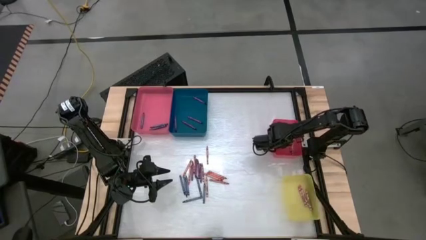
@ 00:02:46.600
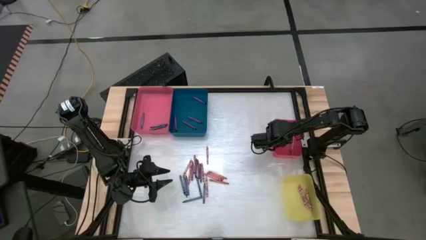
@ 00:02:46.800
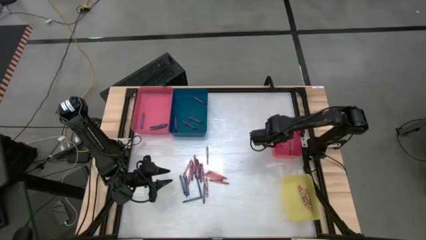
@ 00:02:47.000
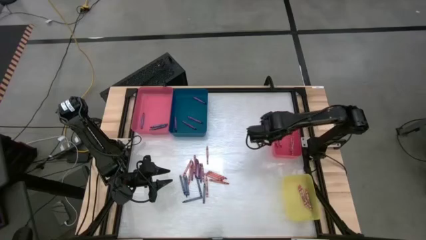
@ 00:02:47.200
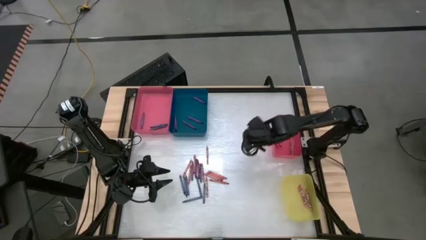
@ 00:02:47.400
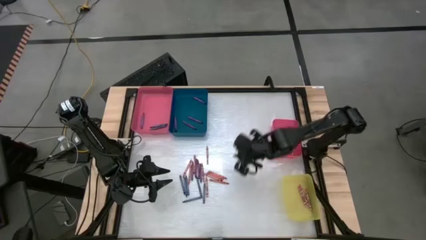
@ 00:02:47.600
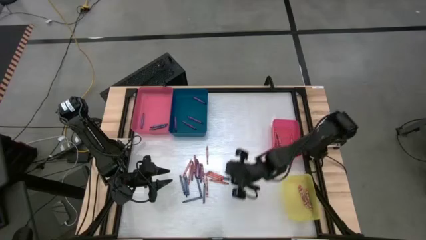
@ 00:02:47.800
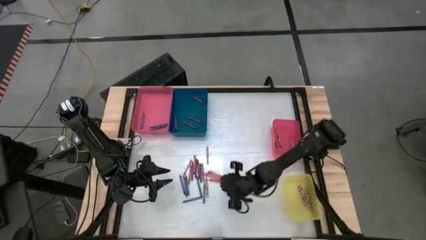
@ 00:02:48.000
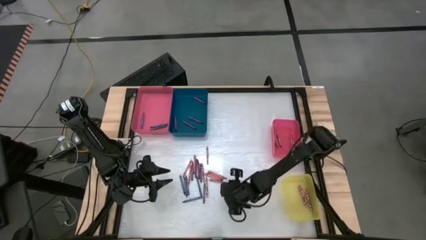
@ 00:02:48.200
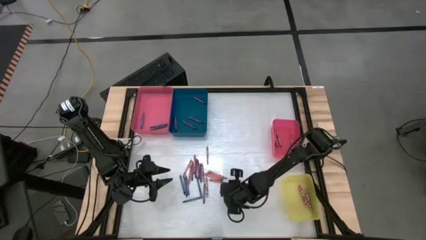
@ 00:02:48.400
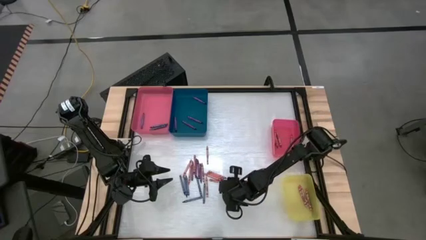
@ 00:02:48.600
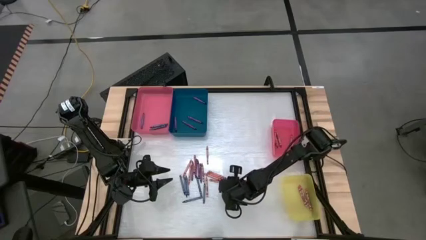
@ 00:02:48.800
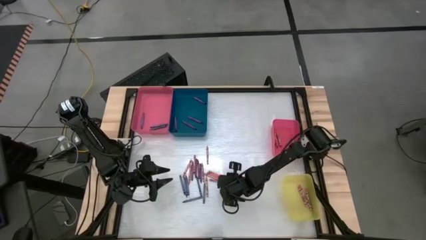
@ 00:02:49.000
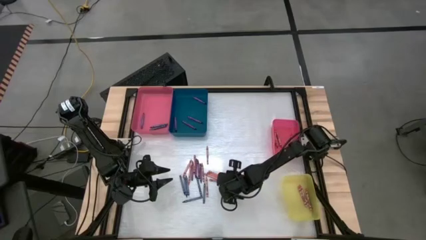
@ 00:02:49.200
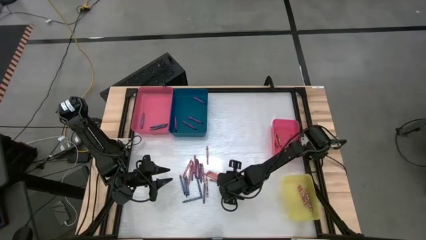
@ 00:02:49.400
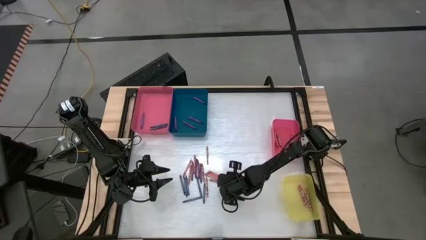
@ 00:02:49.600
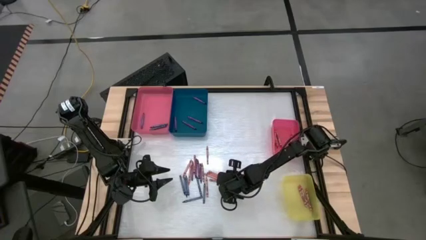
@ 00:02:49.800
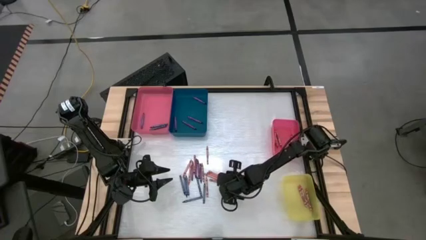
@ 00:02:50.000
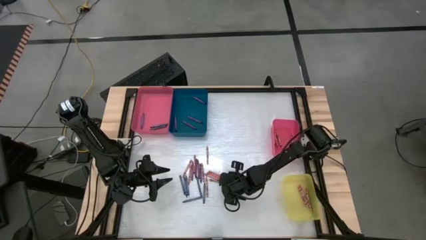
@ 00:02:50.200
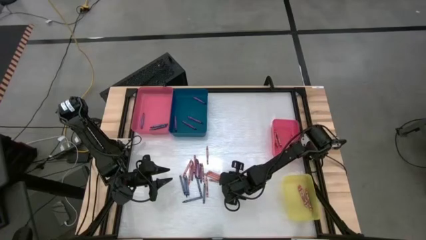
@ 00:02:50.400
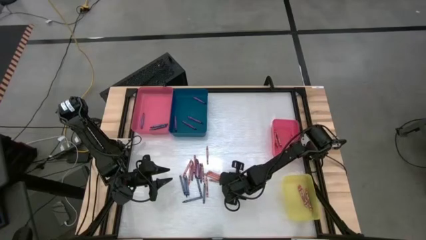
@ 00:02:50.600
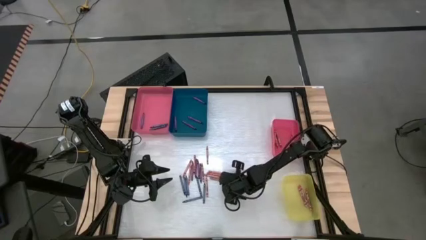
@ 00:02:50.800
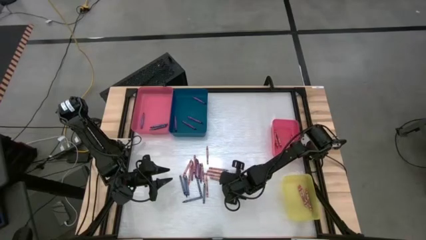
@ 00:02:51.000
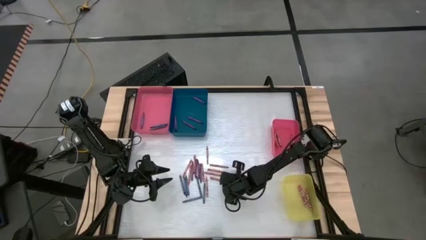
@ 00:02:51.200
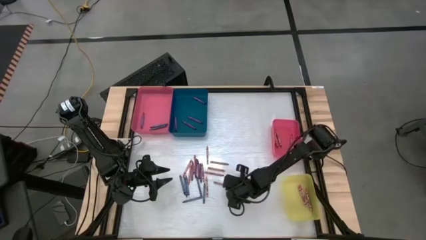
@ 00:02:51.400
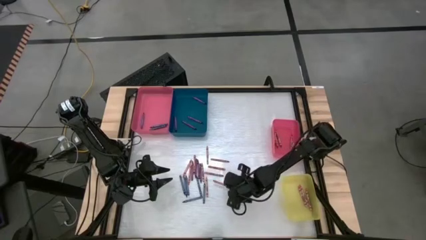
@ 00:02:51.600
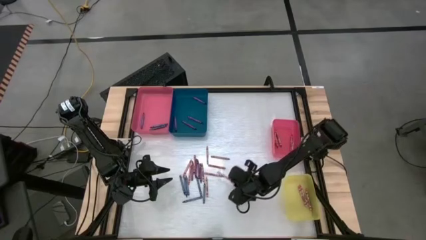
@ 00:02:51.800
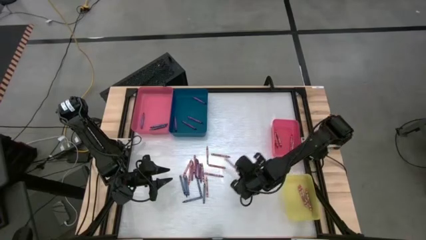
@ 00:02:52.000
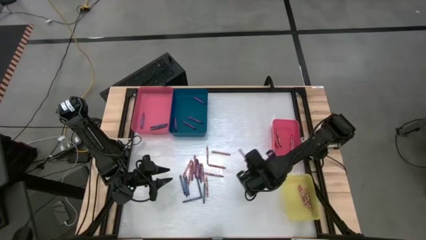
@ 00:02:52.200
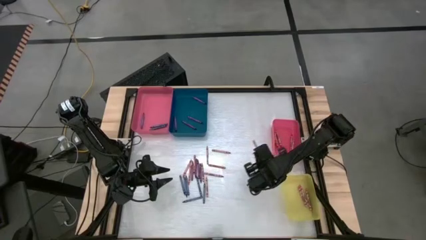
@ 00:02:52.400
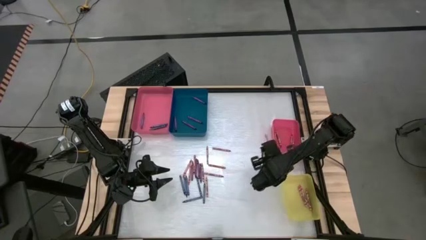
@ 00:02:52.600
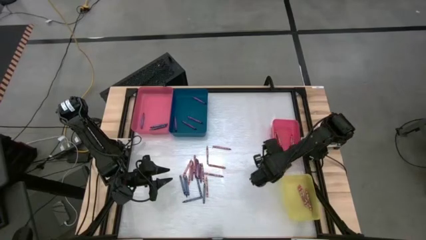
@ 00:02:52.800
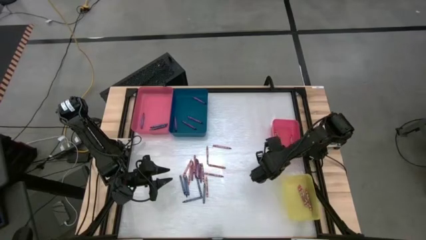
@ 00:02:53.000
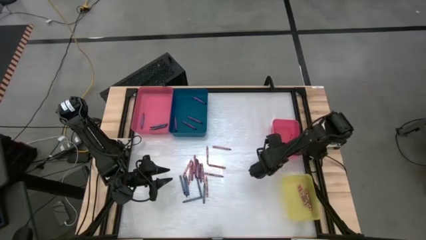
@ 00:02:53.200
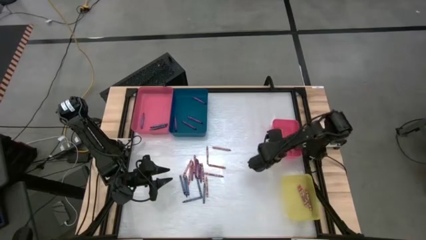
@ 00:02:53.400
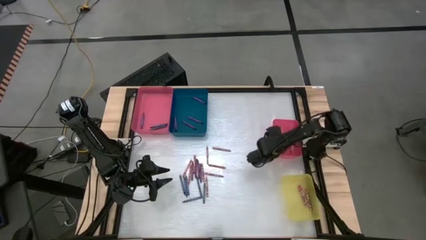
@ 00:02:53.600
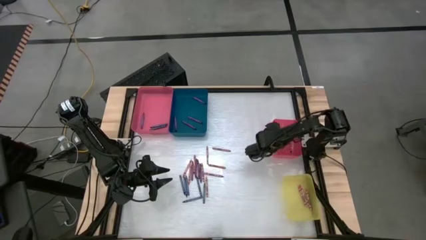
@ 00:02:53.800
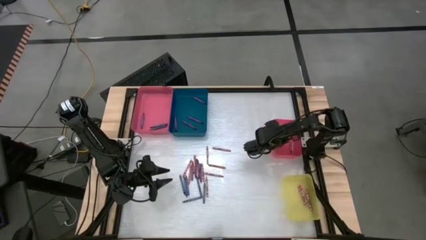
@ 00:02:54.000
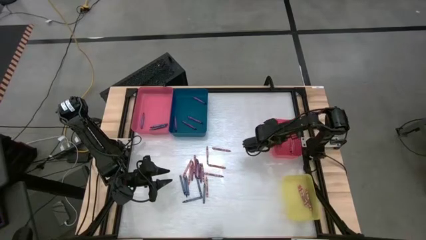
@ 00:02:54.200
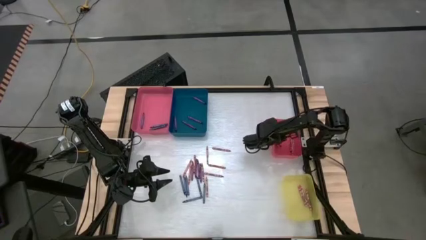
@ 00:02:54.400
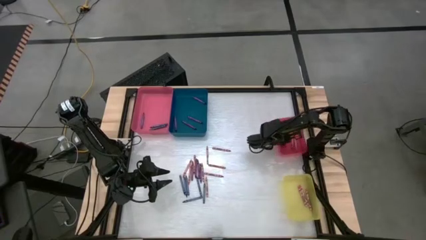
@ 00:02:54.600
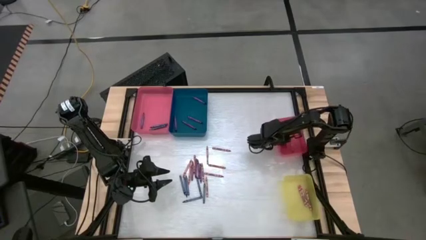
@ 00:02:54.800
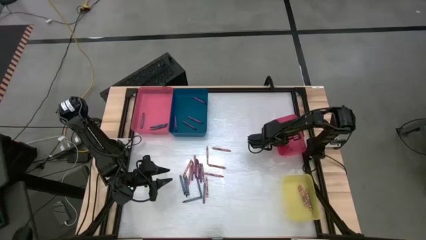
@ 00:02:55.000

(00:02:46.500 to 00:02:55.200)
Task: Sort crayons
Put the red crayon into the small red bin

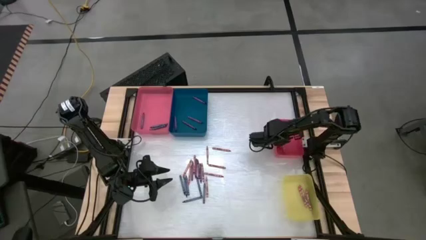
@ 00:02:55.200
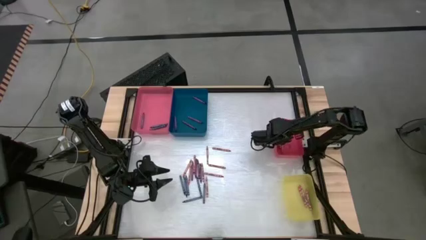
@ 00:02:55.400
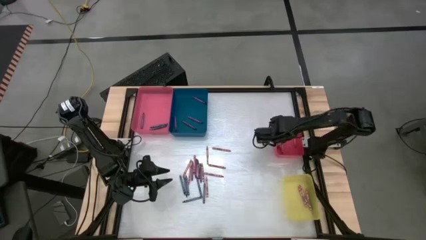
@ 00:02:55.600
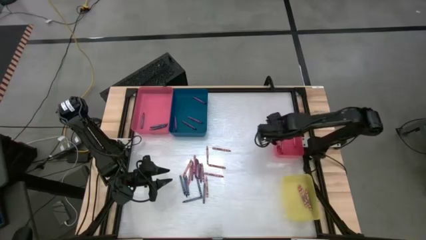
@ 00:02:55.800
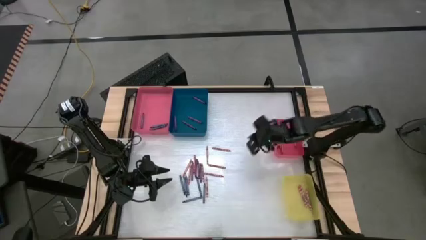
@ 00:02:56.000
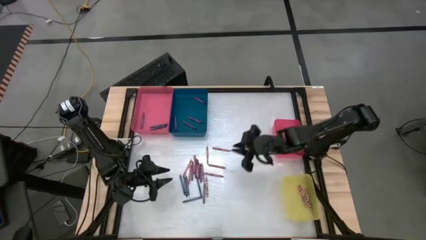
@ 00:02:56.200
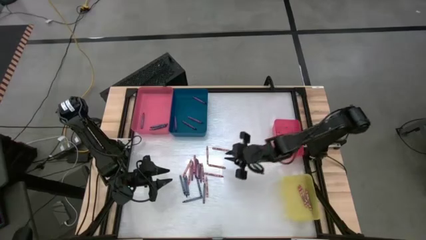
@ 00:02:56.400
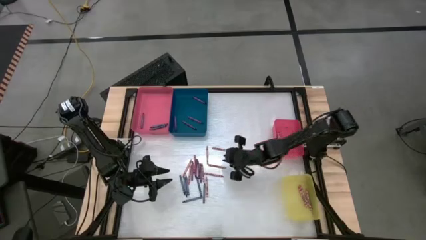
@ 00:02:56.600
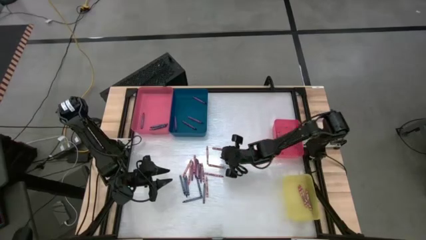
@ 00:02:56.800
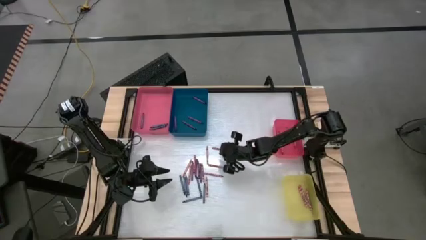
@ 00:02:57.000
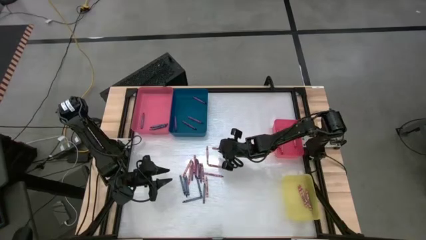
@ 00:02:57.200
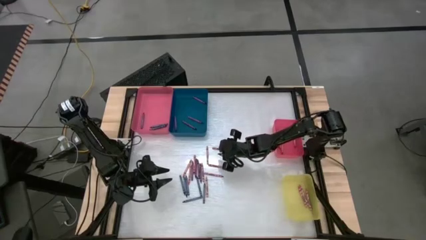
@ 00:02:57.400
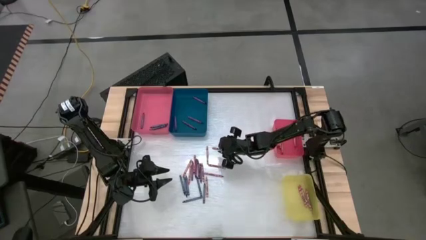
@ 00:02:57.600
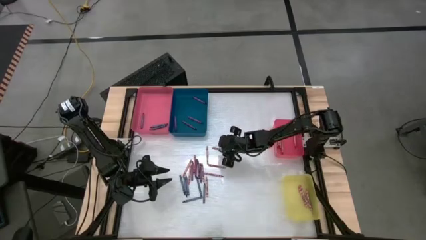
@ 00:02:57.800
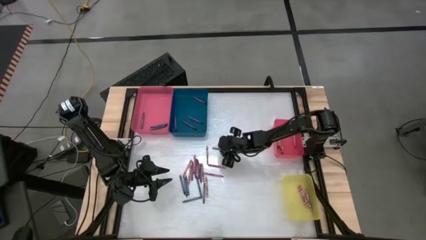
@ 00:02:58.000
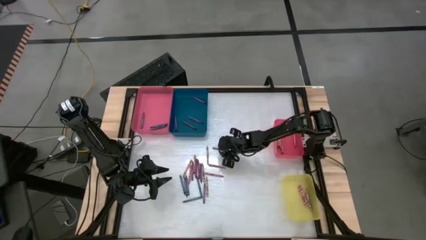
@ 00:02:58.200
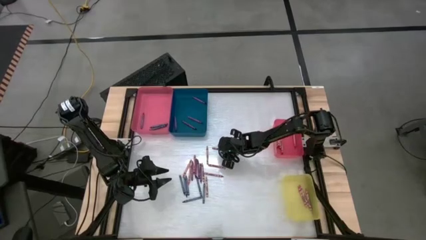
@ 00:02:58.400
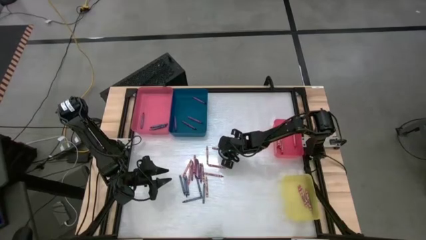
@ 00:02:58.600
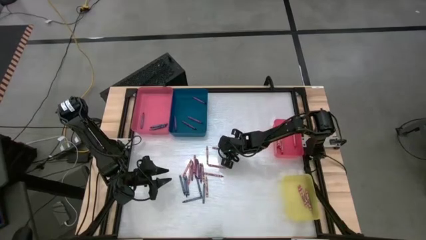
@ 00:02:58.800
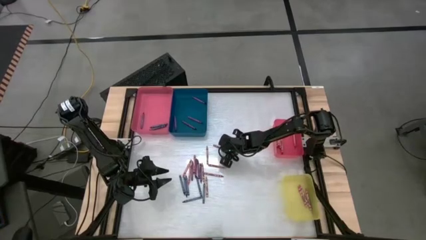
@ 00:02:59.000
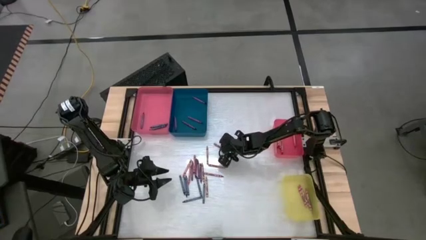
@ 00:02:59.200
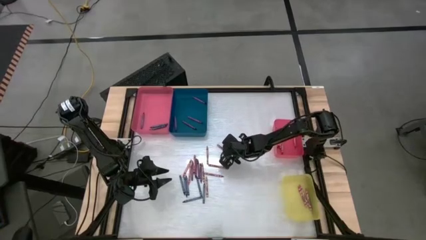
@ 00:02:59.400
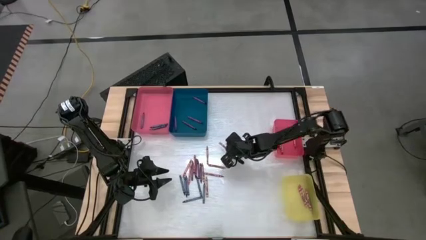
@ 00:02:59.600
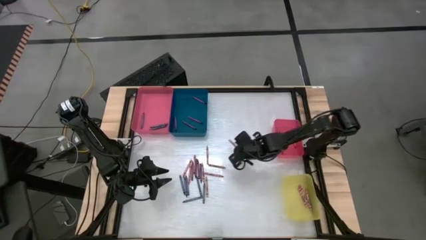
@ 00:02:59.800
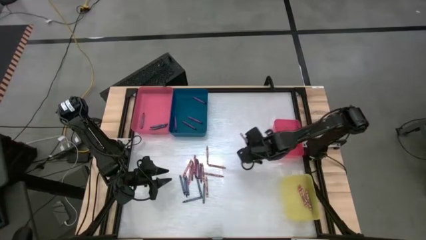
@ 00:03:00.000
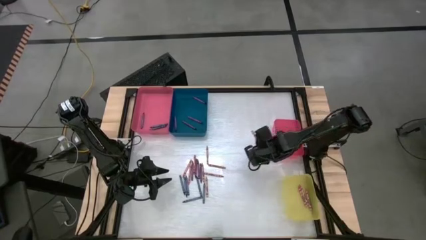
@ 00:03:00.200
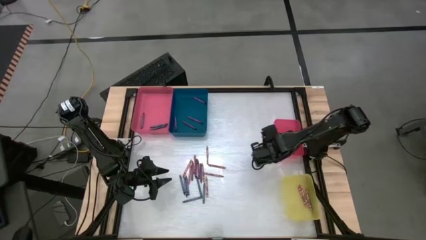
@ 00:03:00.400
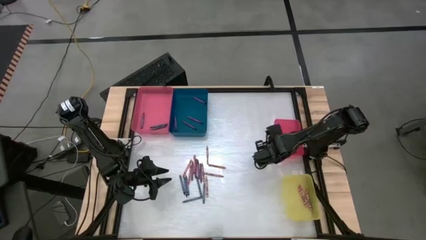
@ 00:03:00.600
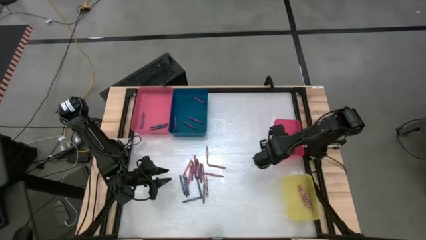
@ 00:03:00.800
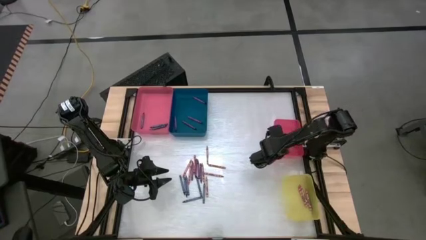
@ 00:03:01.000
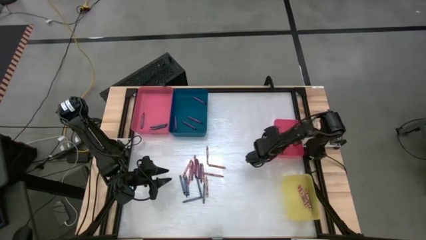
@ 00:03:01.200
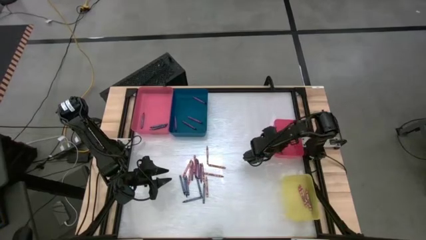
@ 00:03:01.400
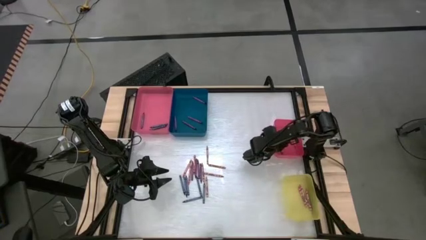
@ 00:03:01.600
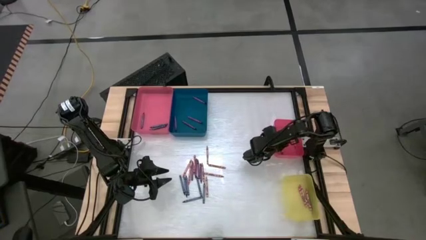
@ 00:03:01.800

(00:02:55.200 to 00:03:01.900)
Put the red crayon into the small red bin
